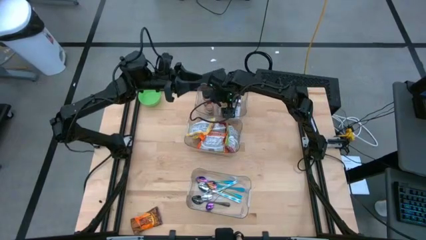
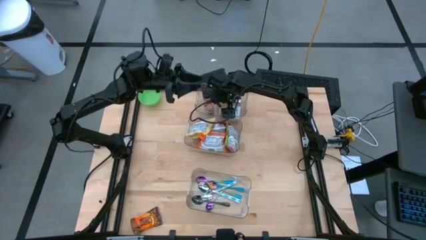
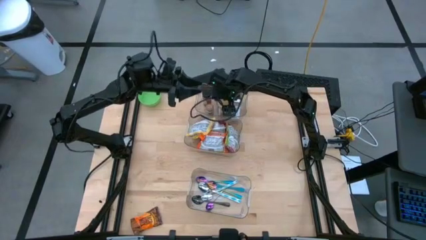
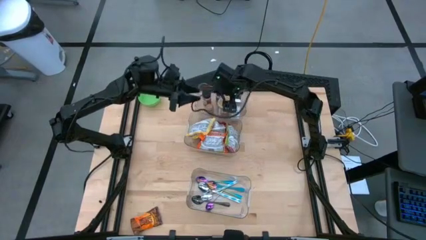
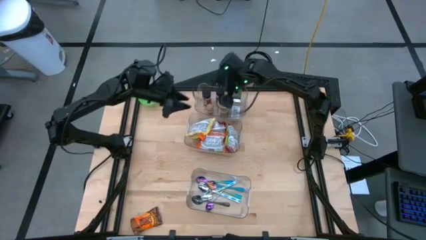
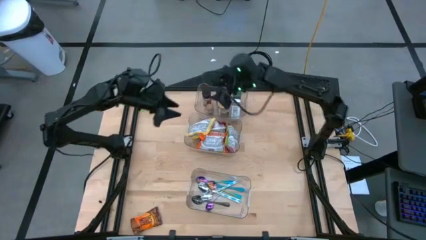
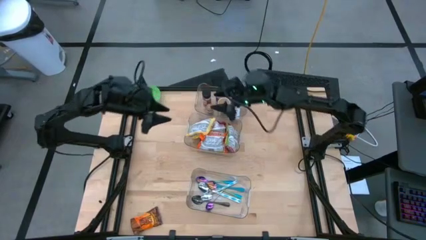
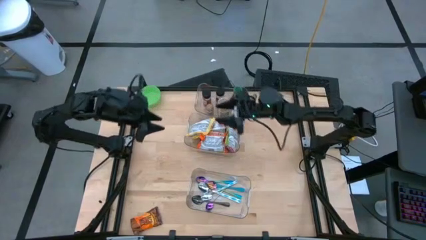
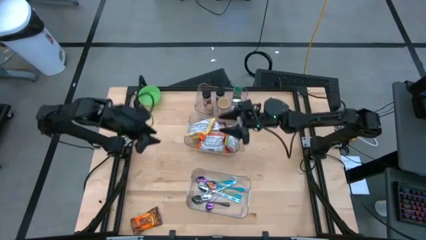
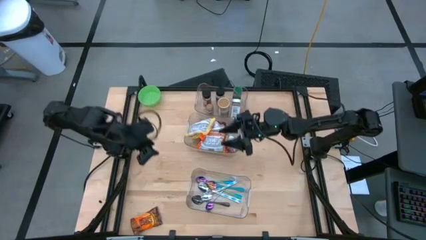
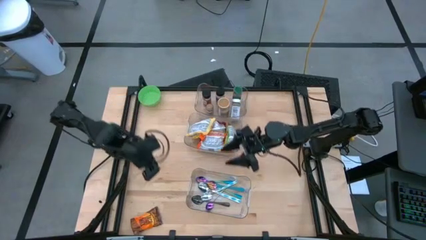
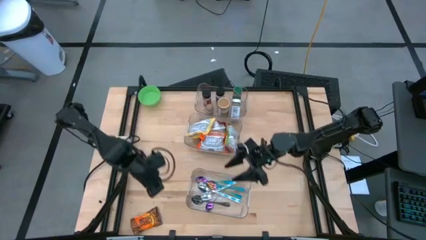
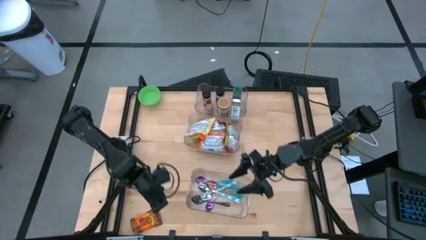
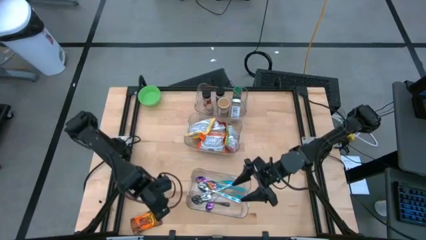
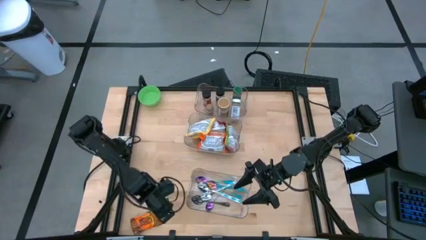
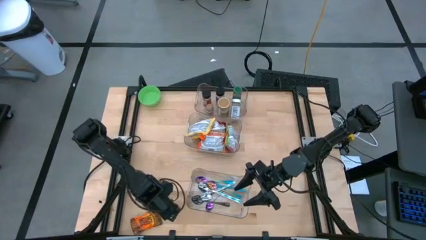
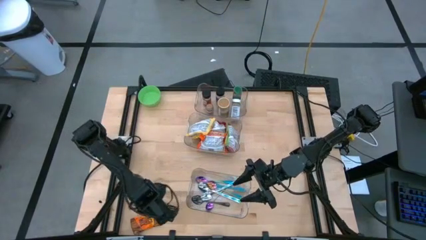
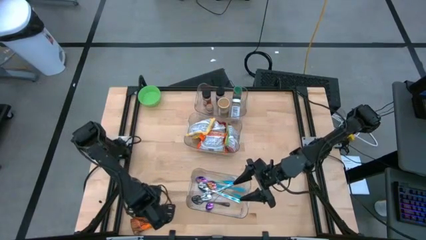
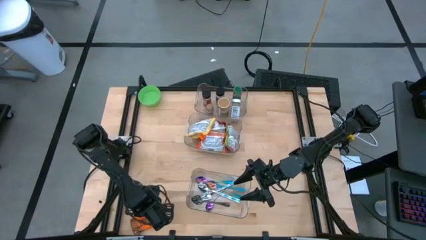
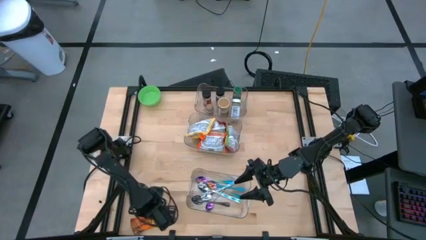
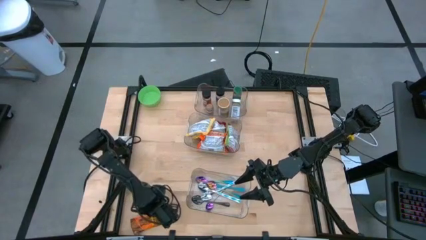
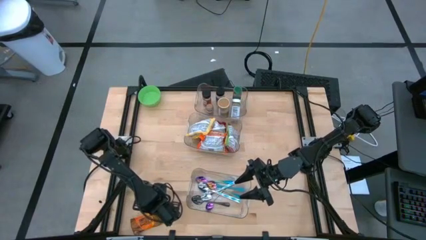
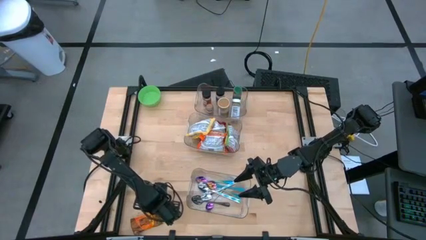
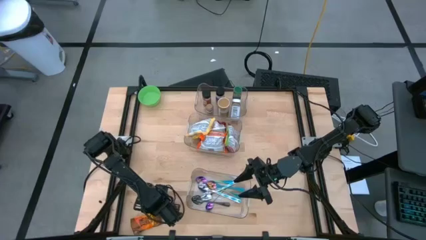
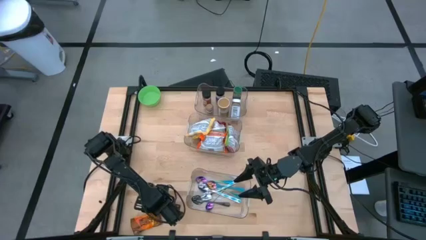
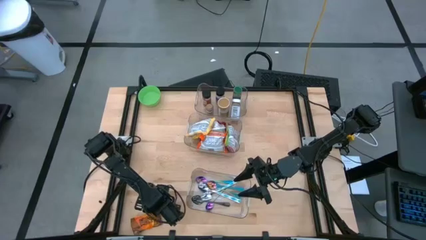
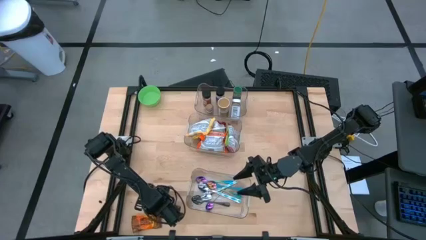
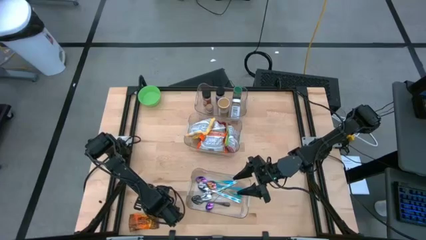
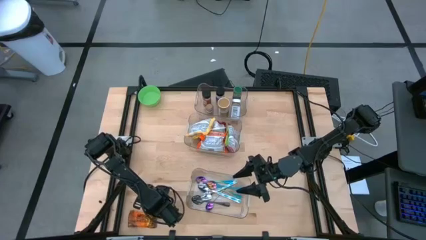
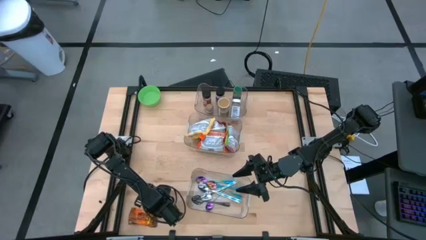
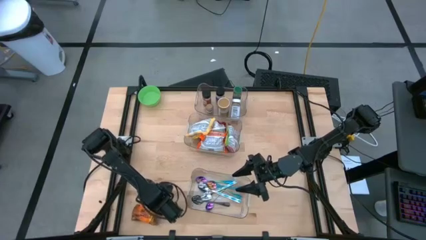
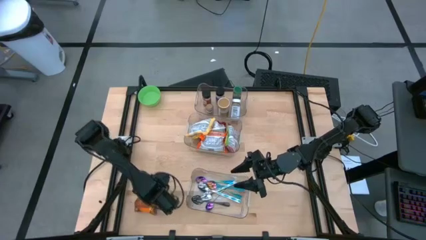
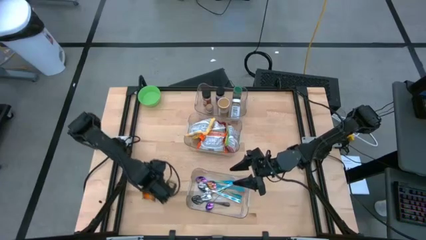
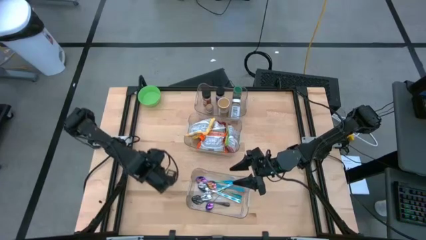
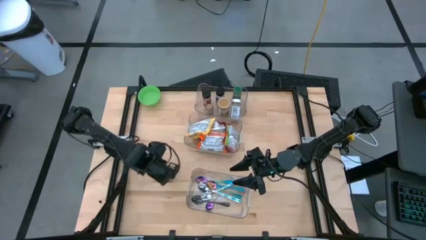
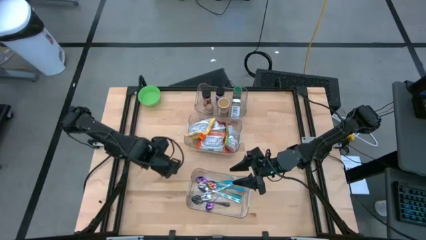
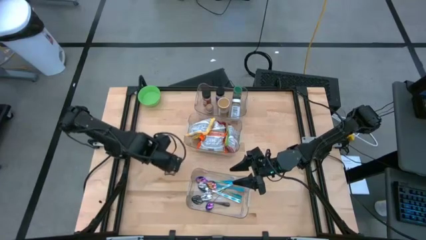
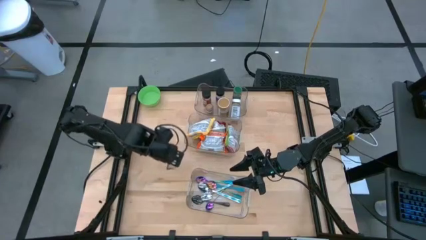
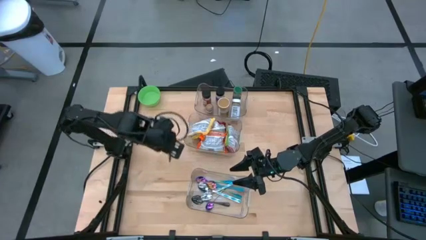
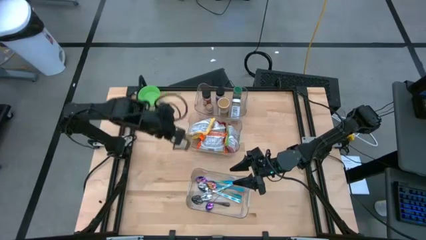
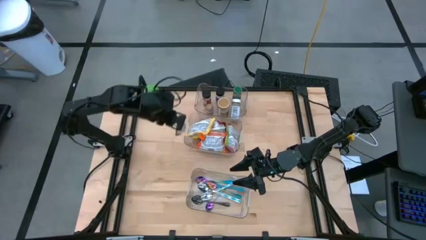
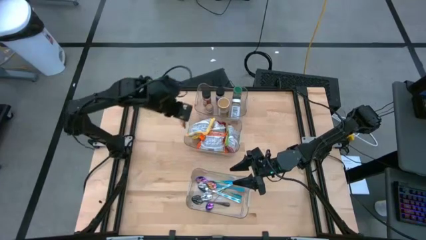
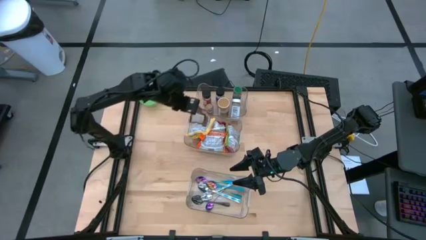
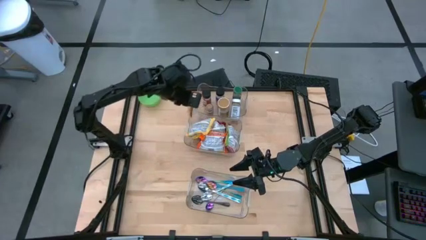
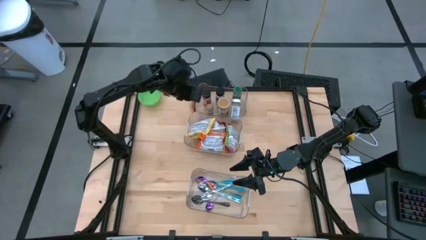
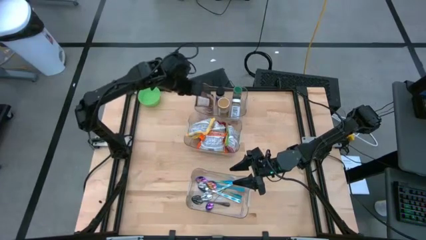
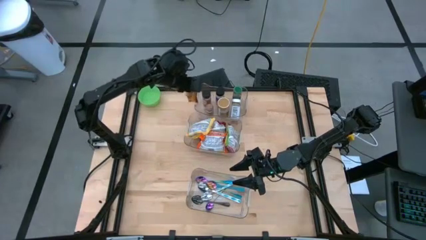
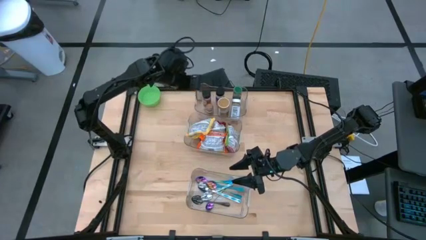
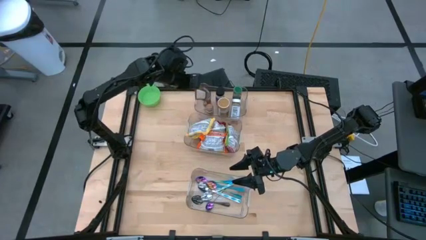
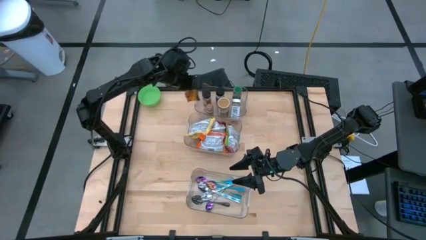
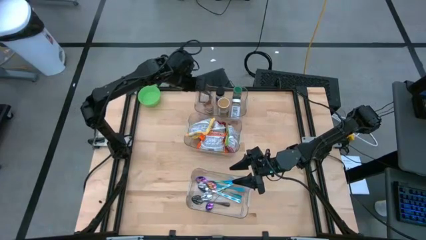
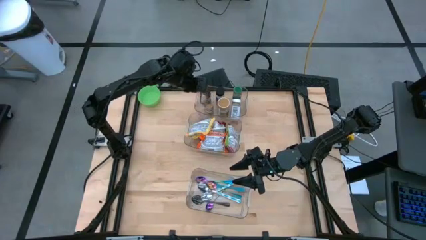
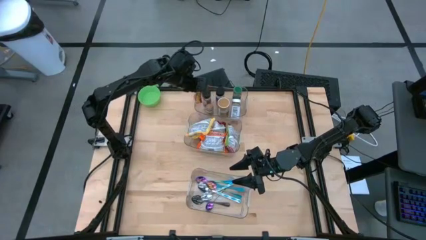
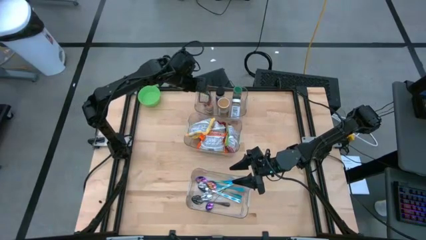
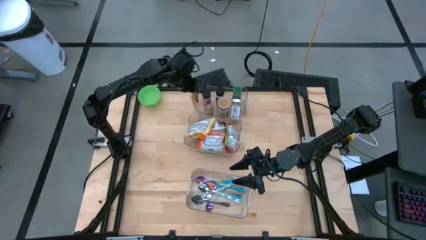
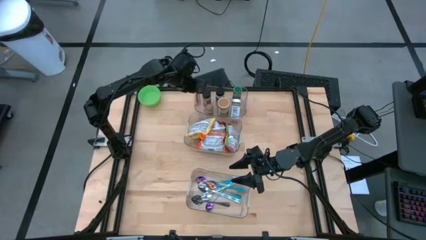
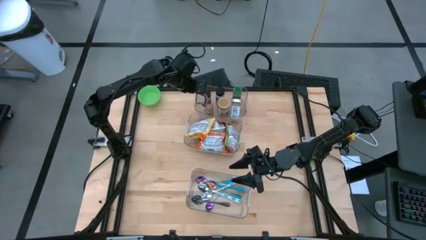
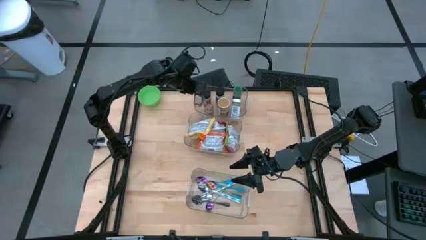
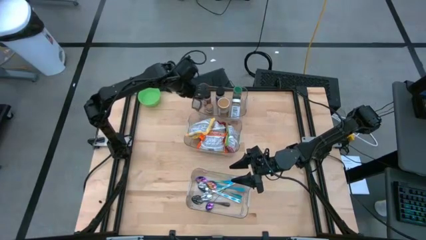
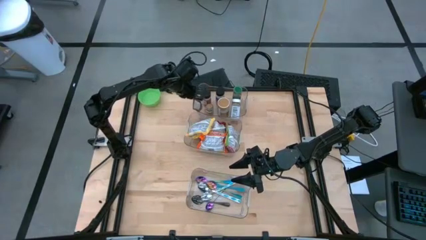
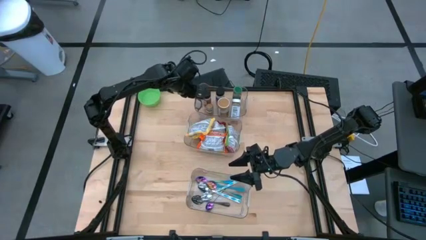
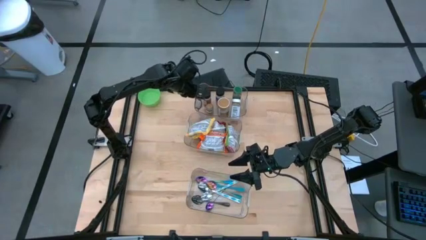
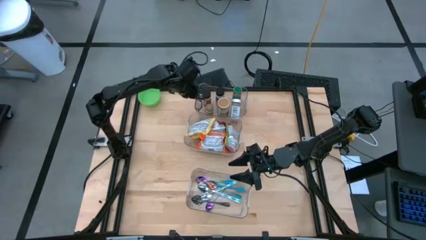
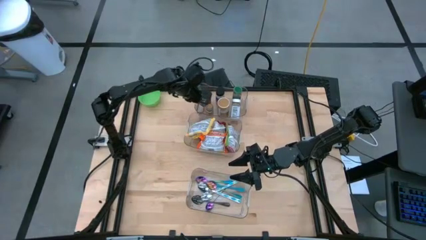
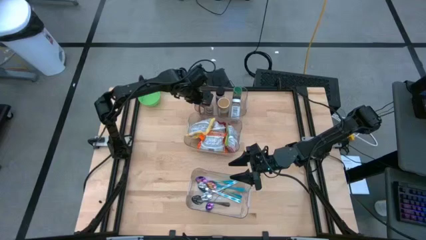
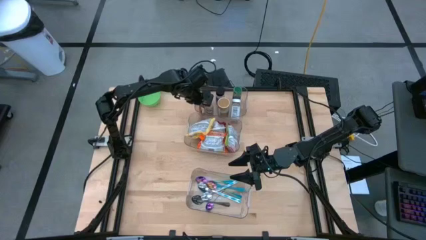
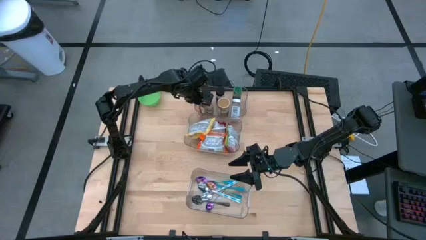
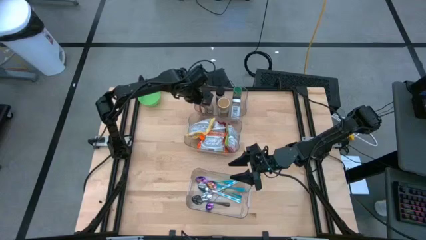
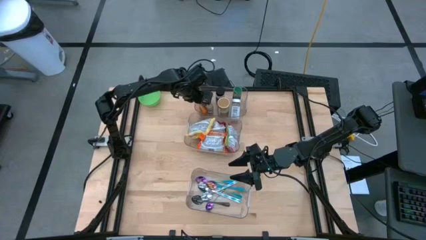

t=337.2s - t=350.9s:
Task: Pick & Place Food Item
Put the orange seasoning bag into the top transparent bin
